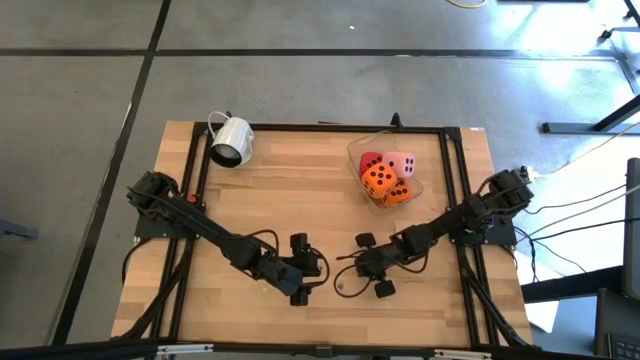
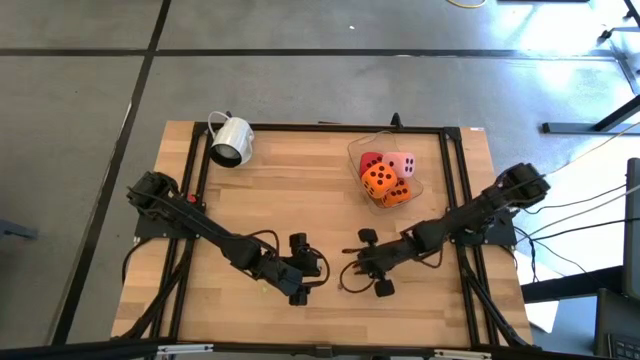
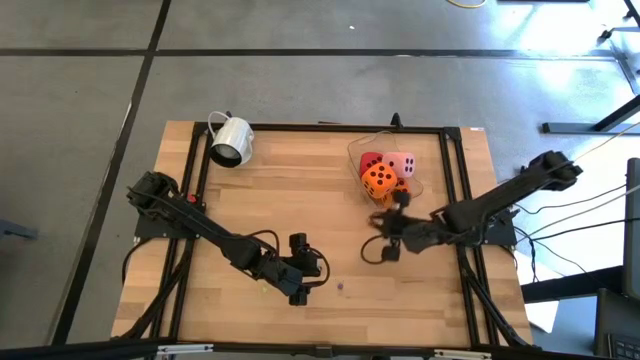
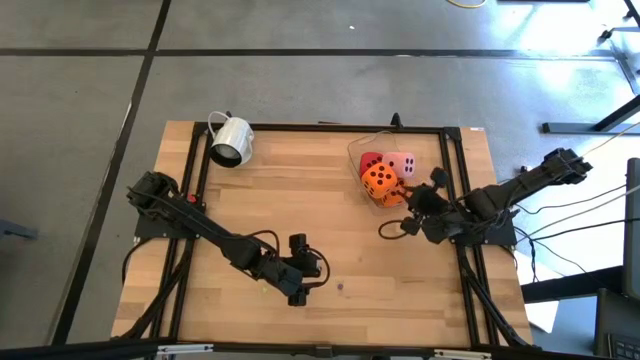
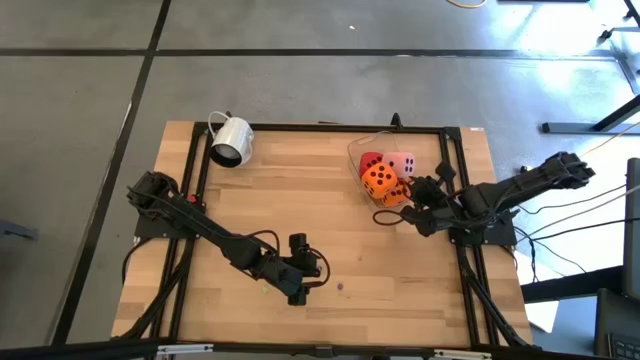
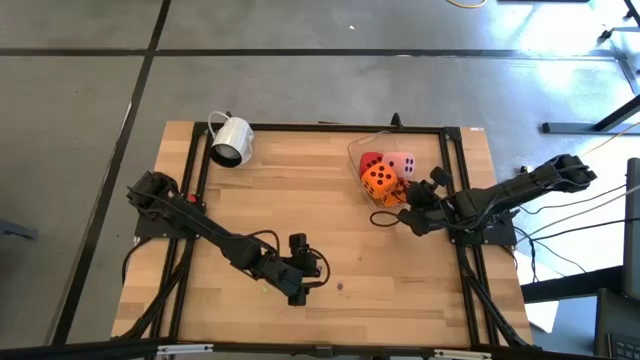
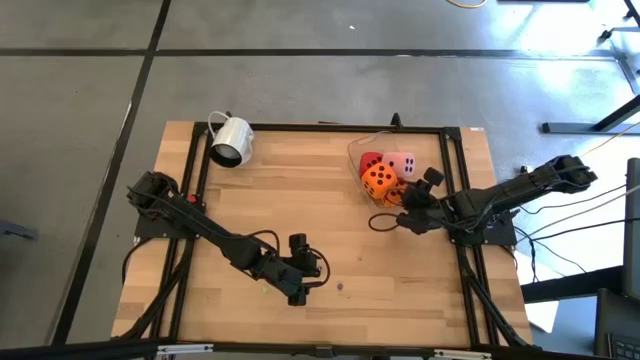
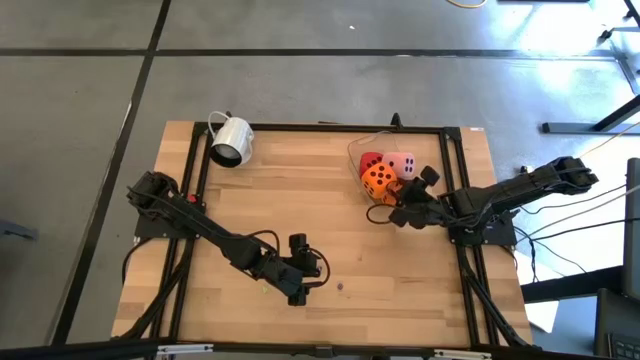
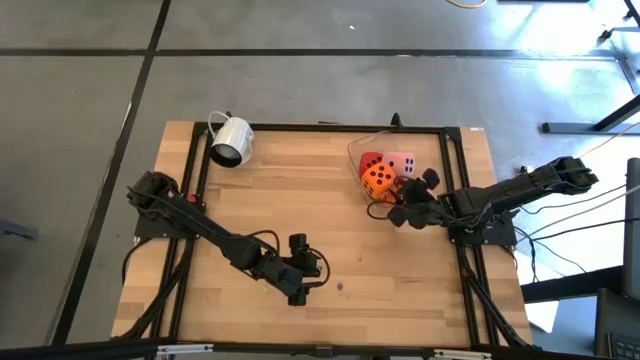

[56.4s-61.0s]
Task: Pick & Place Dice
Put the small orange die in the bin

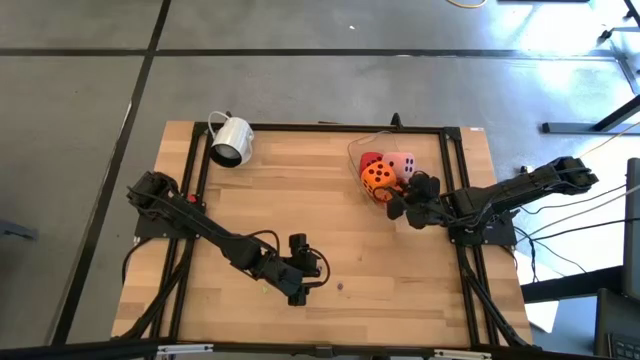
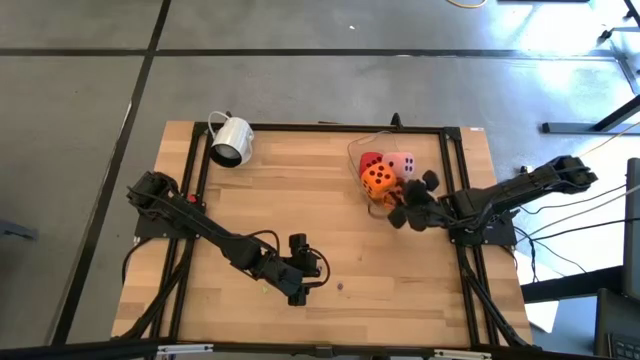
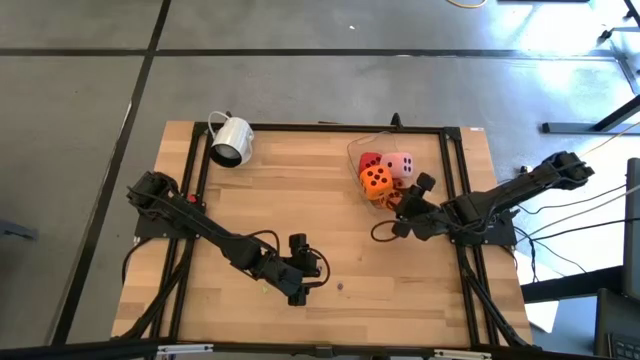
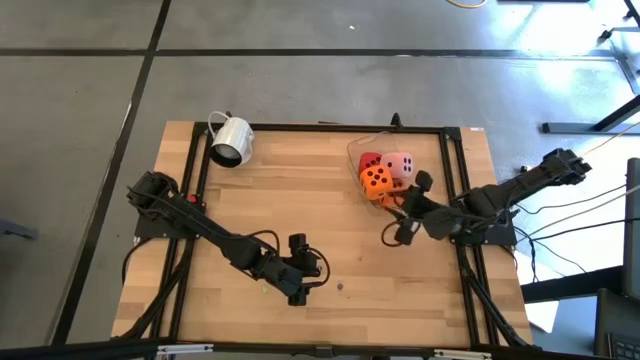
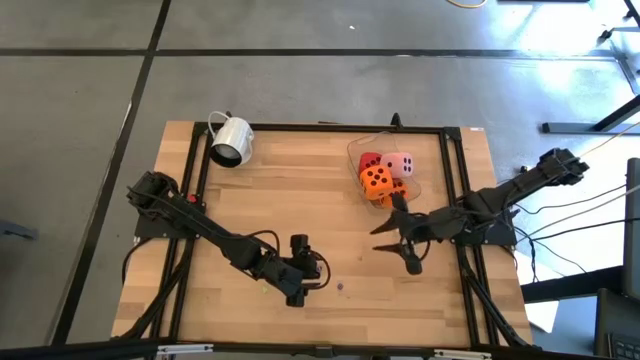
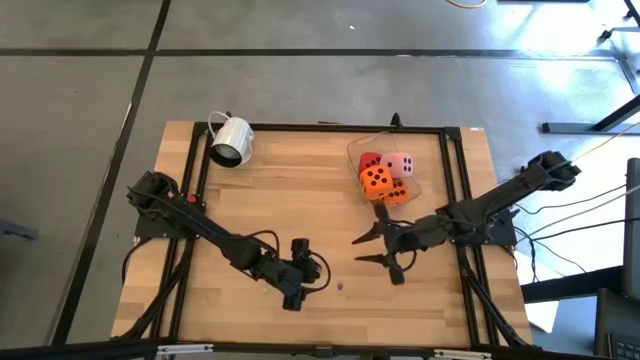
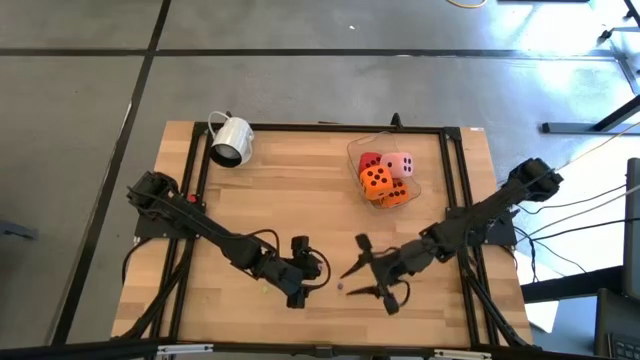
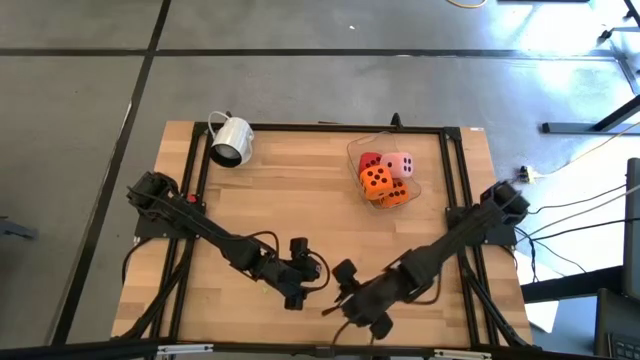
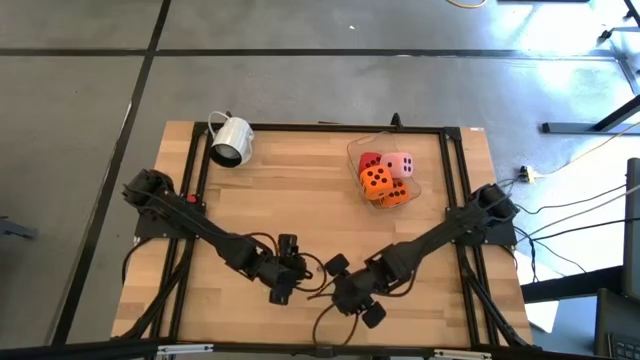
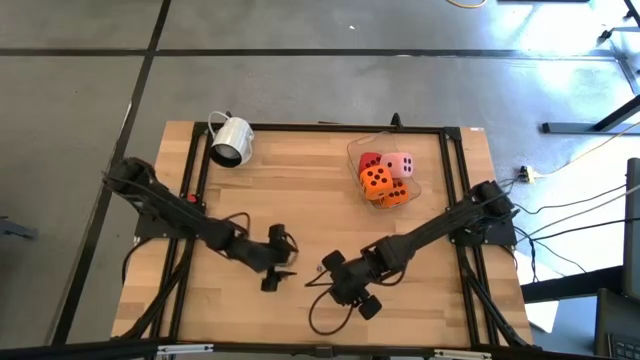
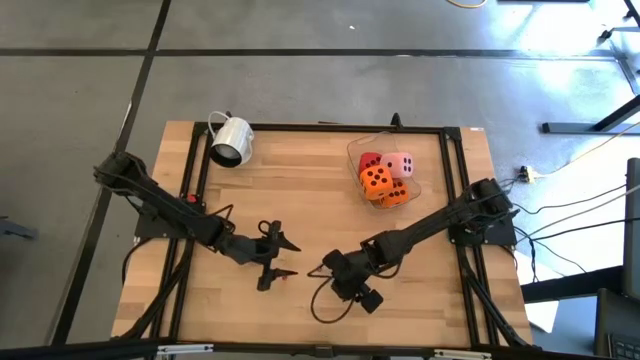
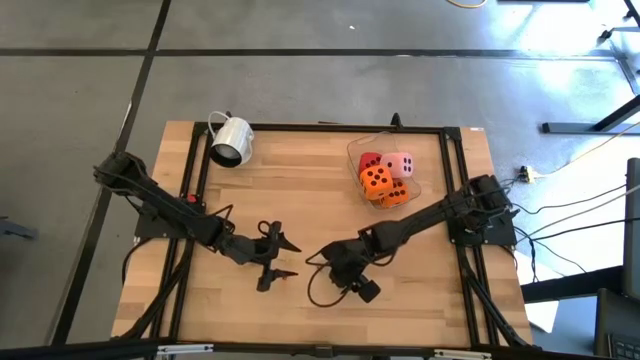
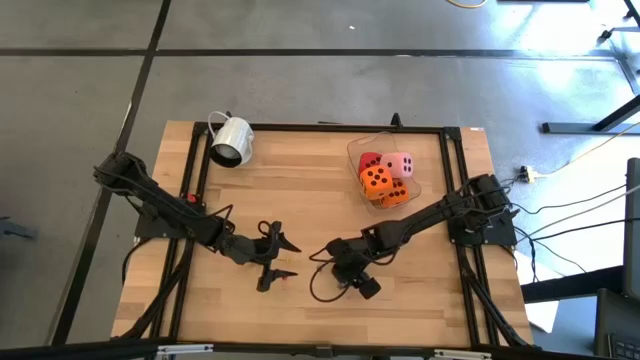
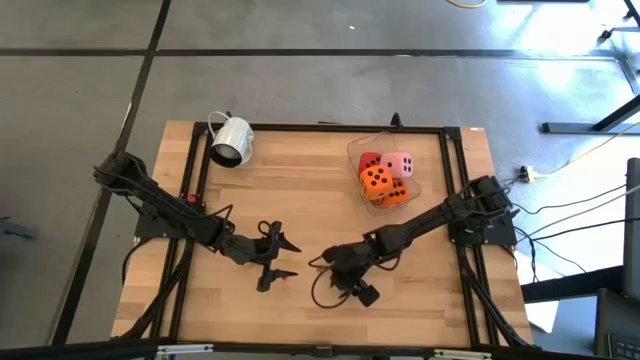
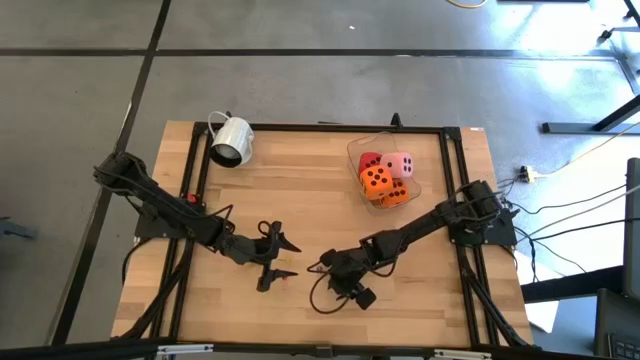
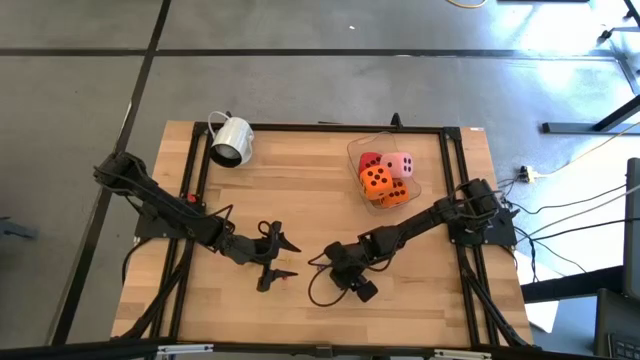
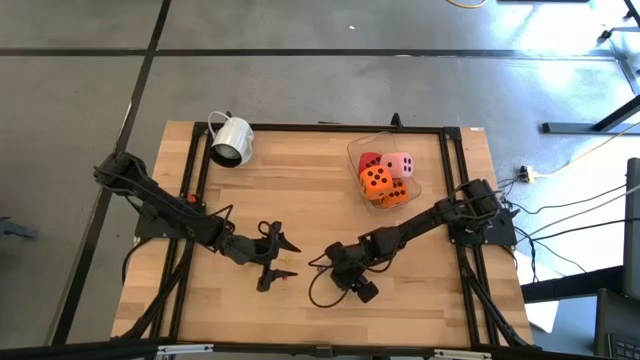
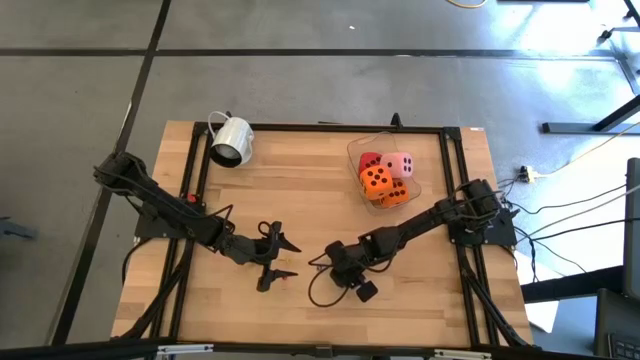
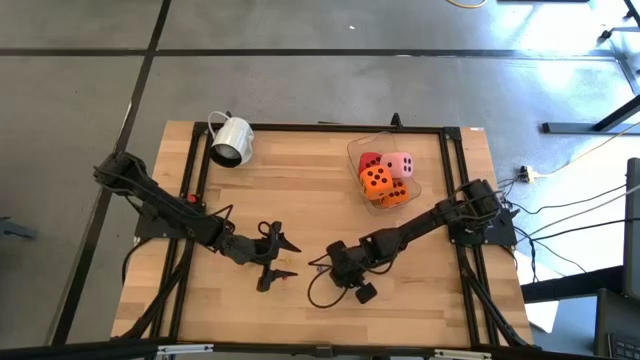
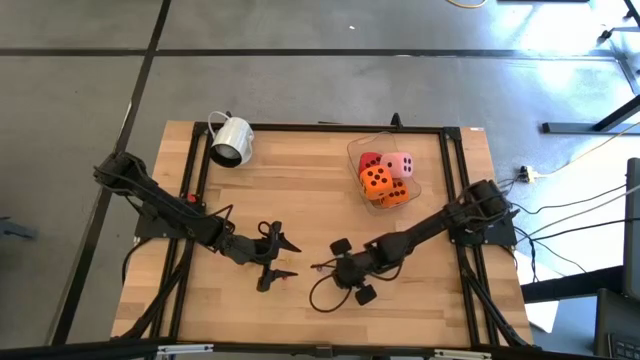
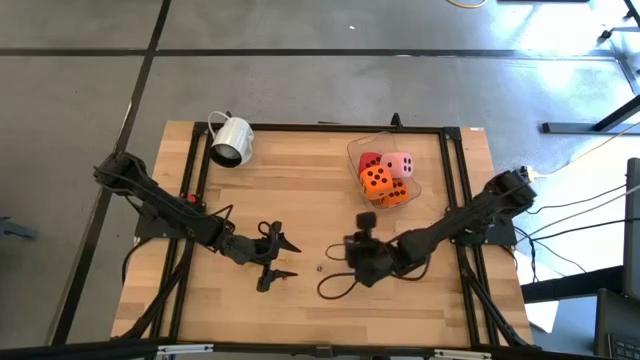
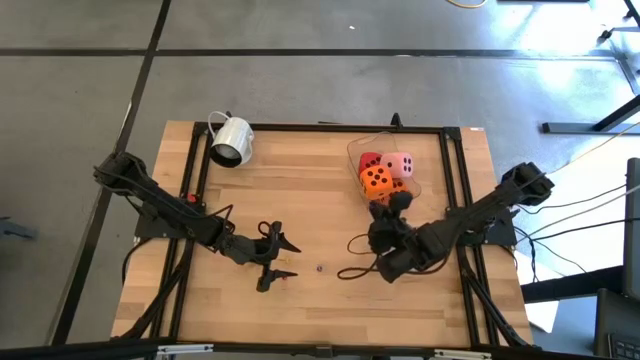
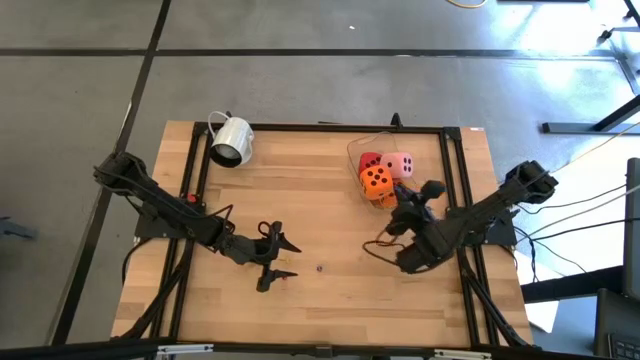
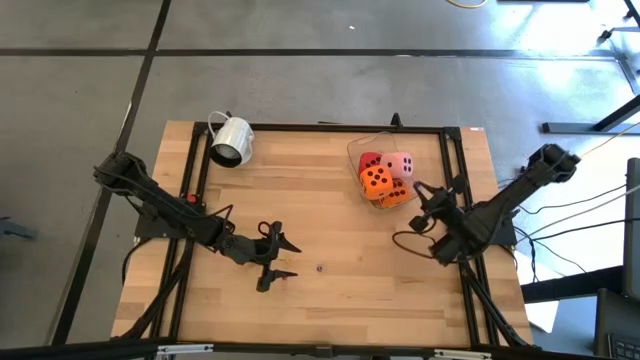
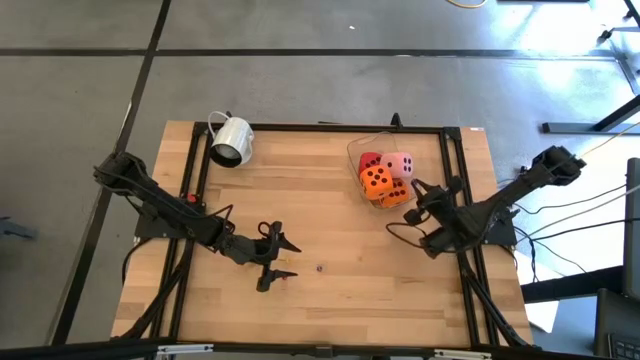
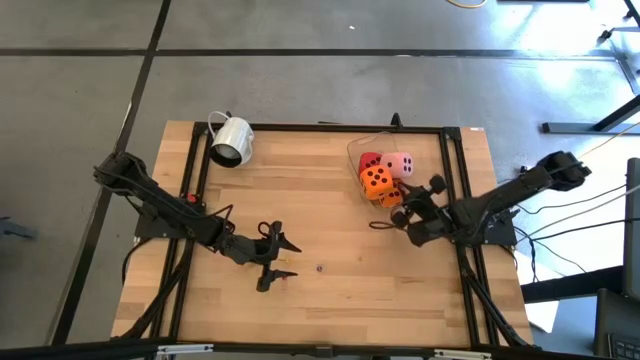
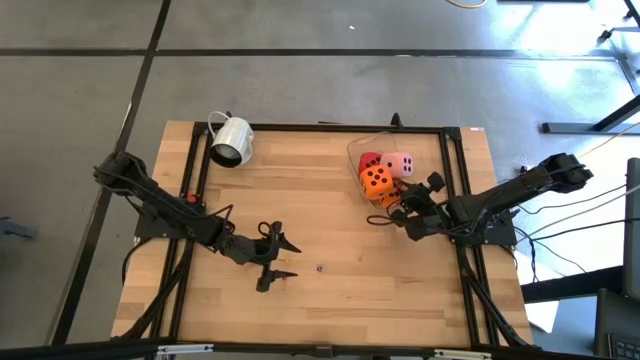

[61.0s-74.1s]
Put the bottom small blue die in the bin

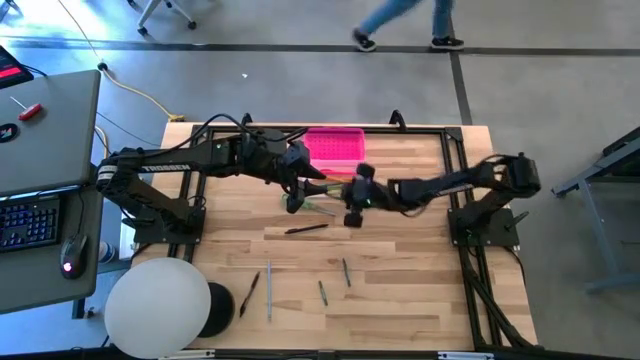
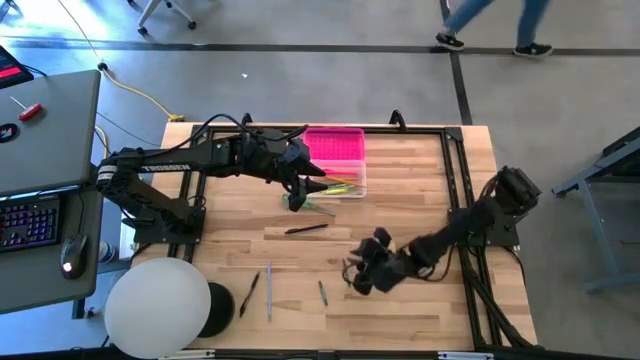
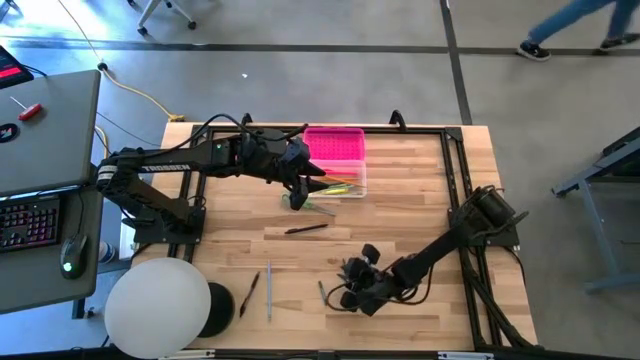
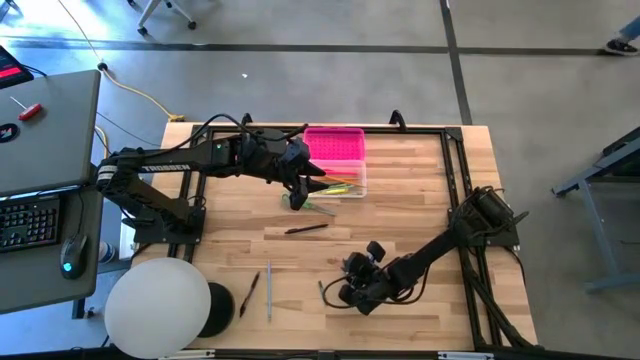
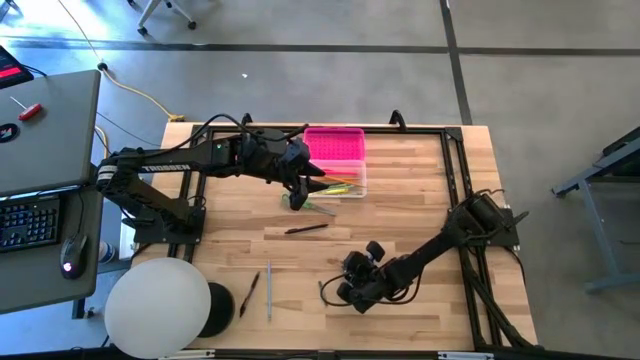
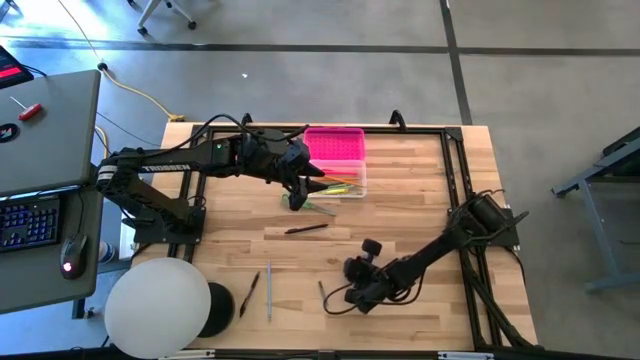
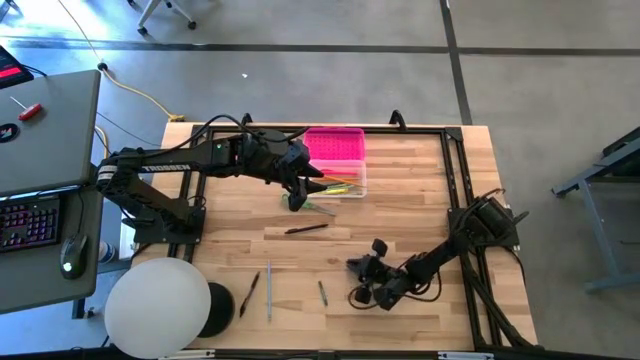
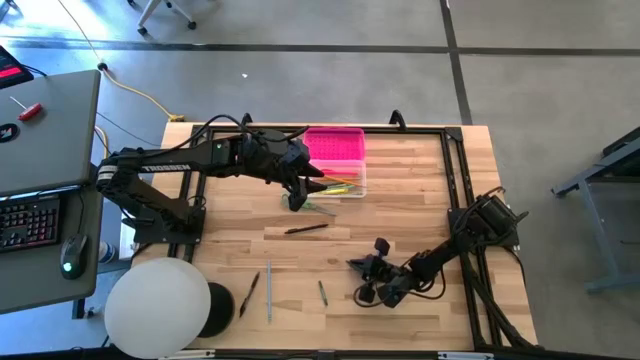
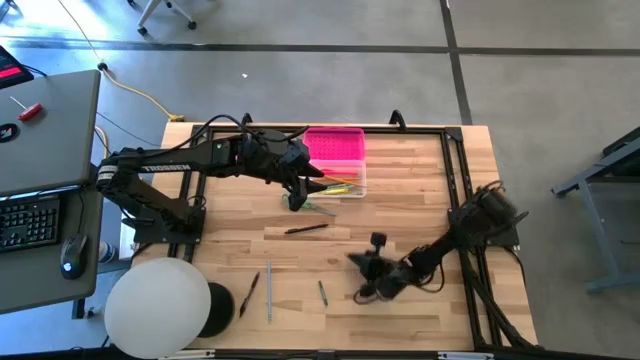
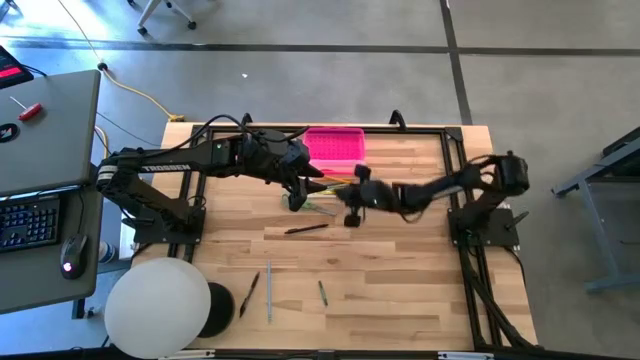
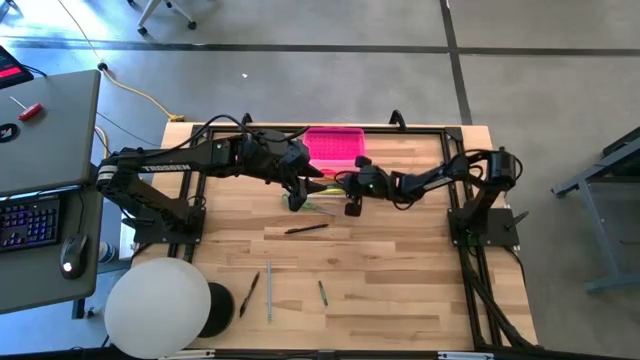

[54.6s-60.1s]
Task: Pick & place school supplies into a supply box
Put the right dark green crayon into the supply box
